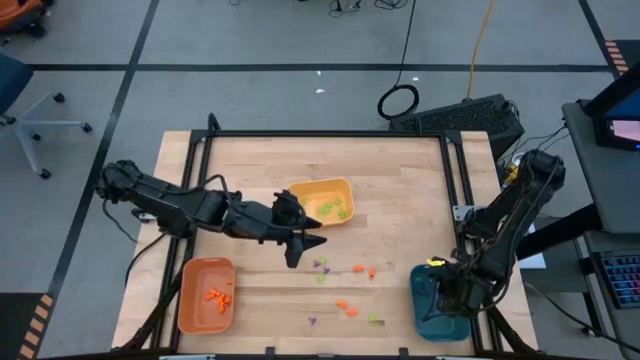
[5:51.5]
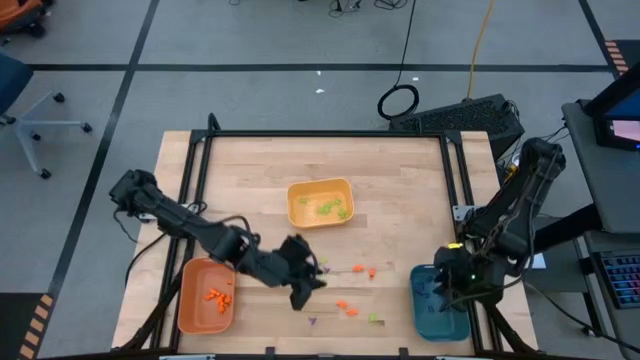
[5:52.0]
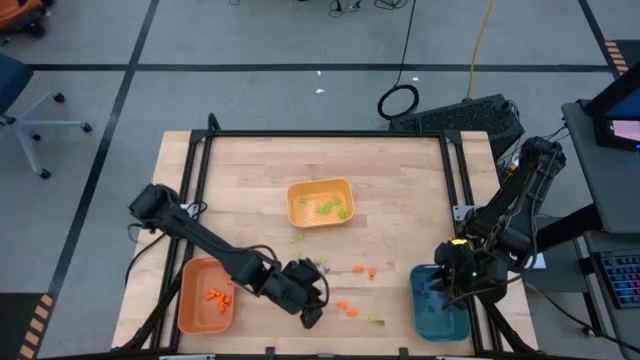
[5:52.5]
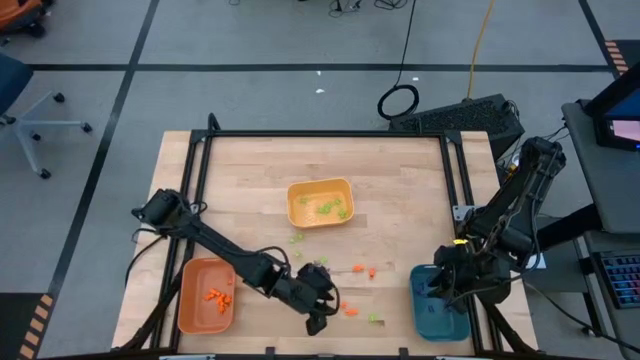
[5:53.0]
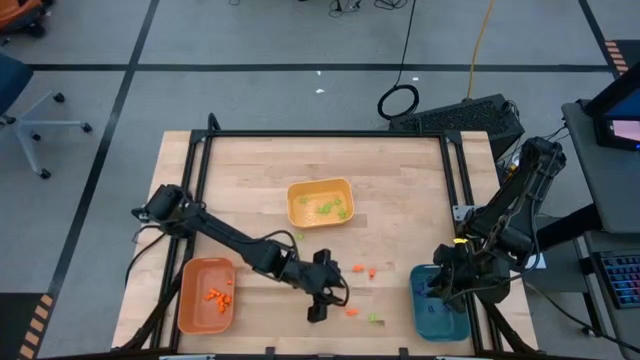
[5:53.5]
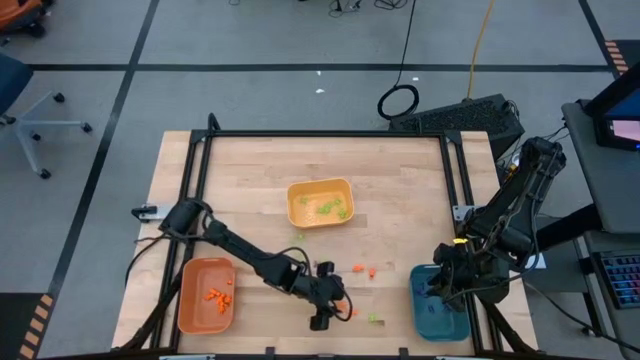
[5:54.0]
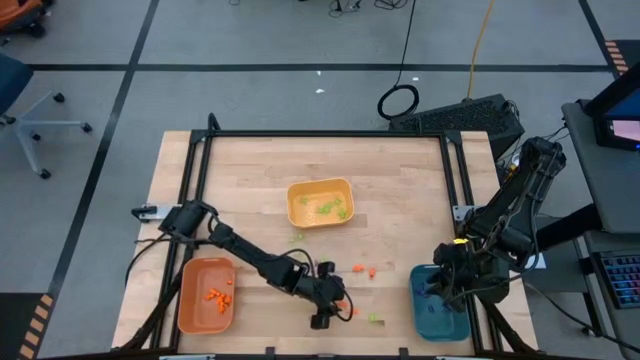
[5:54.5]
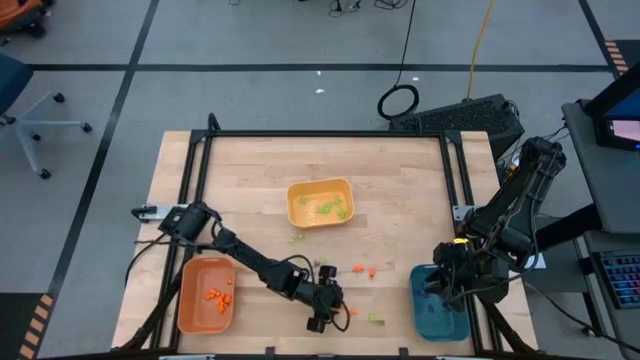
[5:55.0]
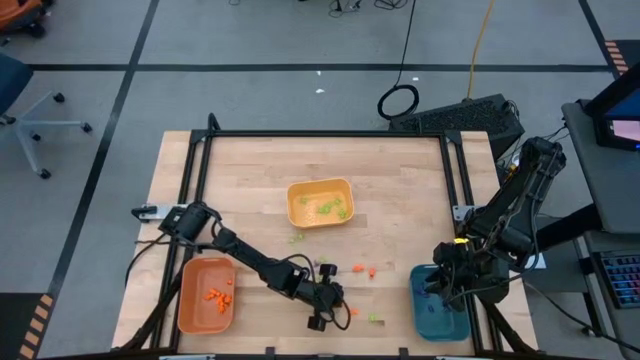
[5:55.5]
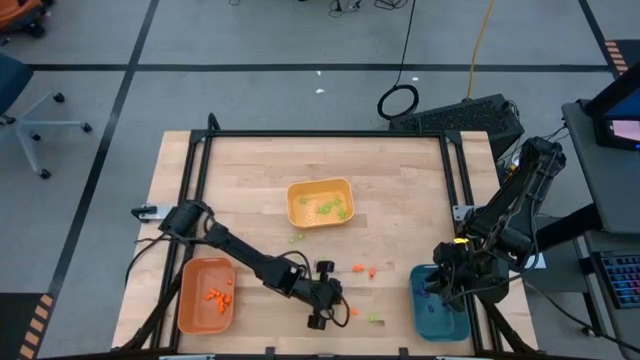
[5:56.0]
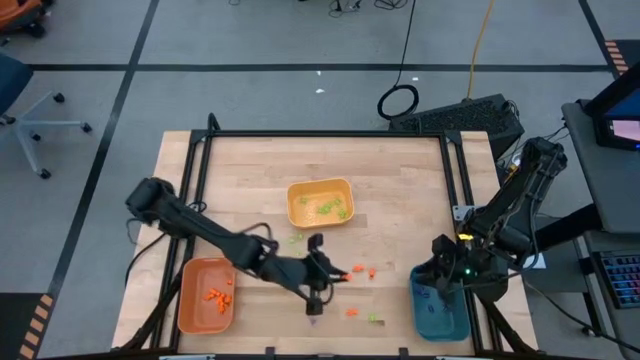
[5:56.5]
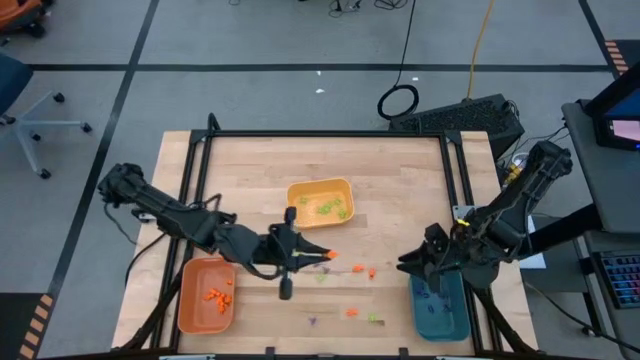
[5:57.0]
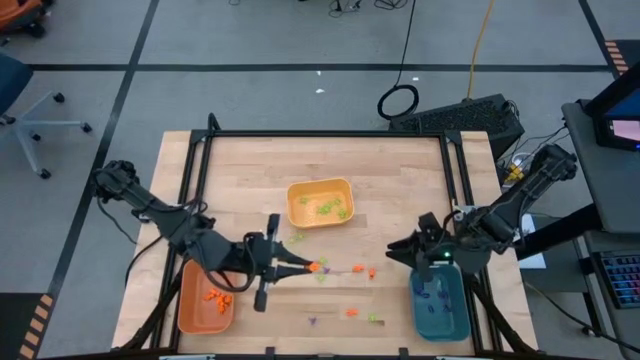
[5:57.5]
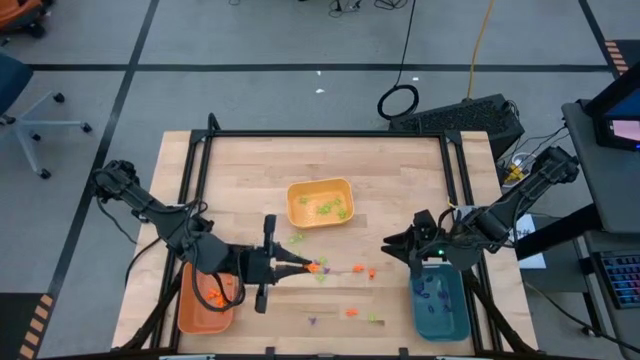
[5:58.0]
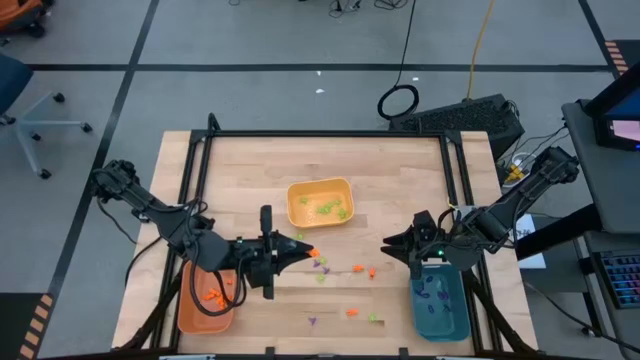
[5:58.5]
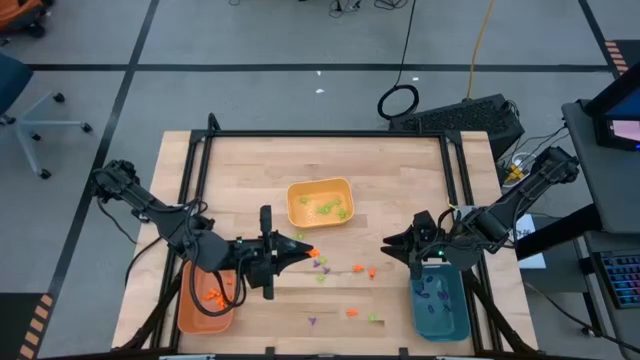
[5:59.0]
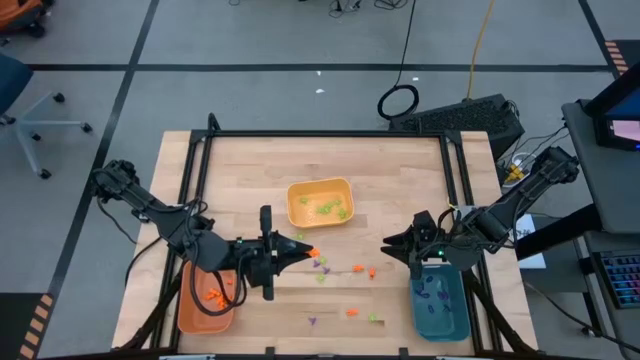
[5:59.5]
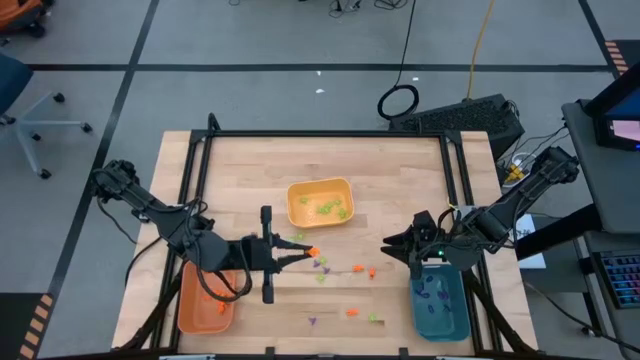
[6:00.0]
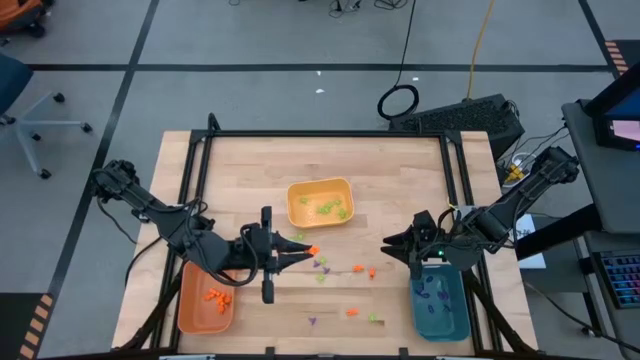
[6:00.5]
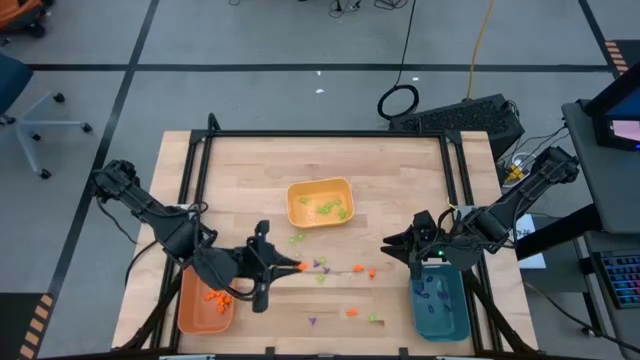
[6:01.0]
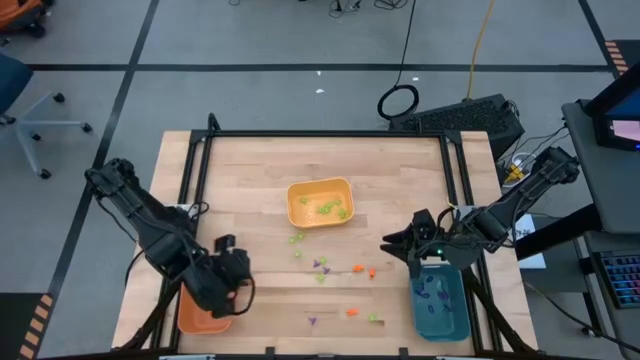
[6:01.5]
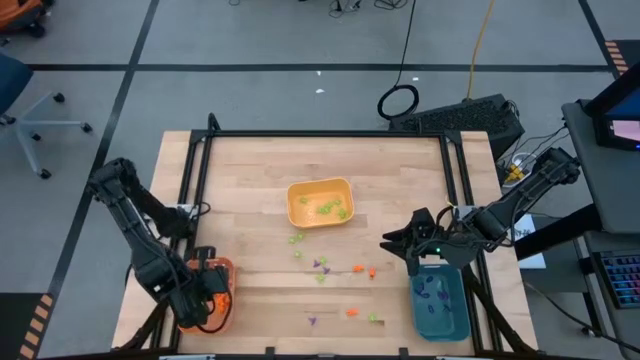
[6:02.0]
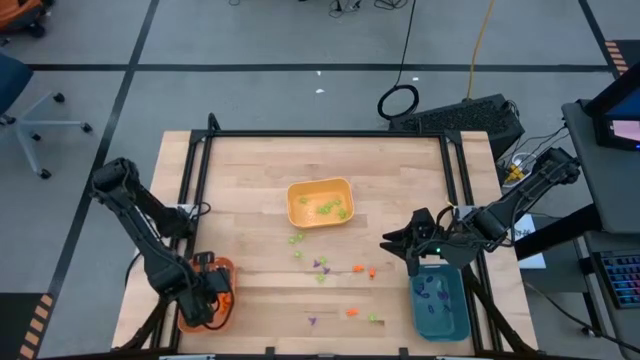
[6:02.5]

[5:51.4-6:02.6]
Task: Sort Halloween decoration
Put the orange skeleton toy into the orange bin

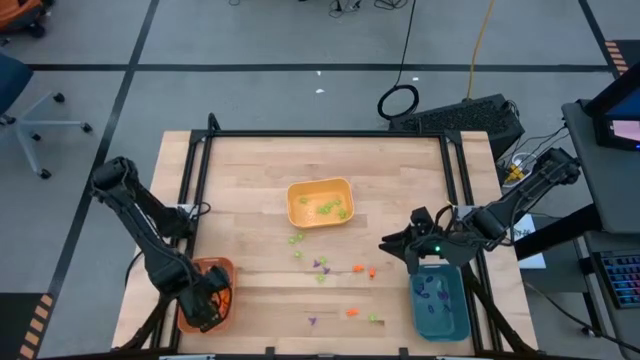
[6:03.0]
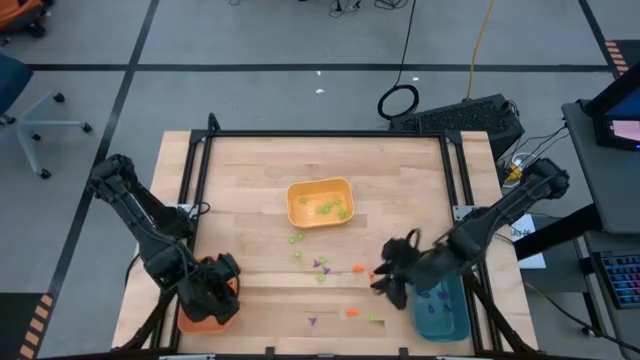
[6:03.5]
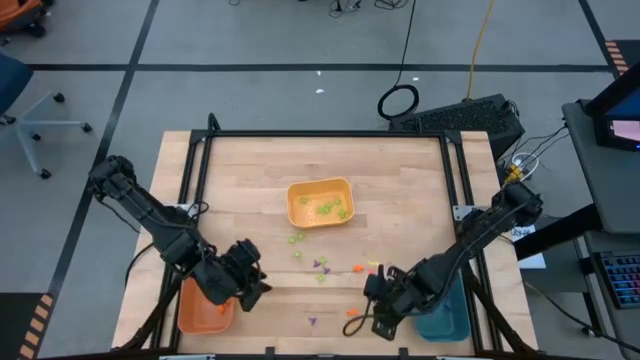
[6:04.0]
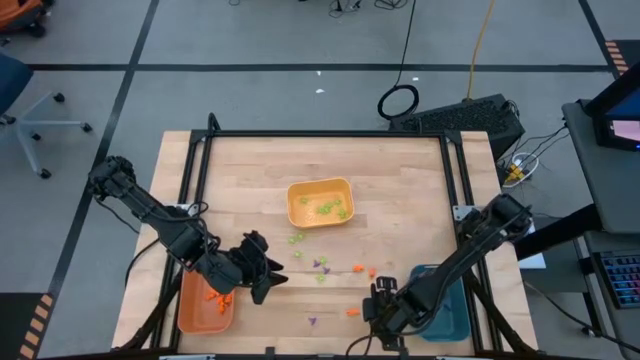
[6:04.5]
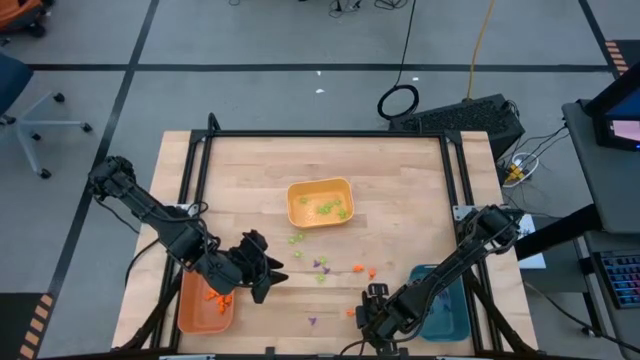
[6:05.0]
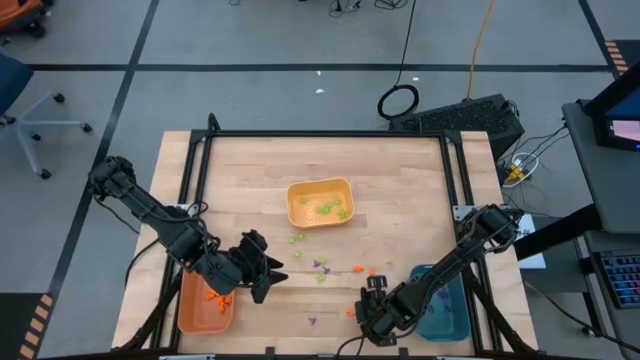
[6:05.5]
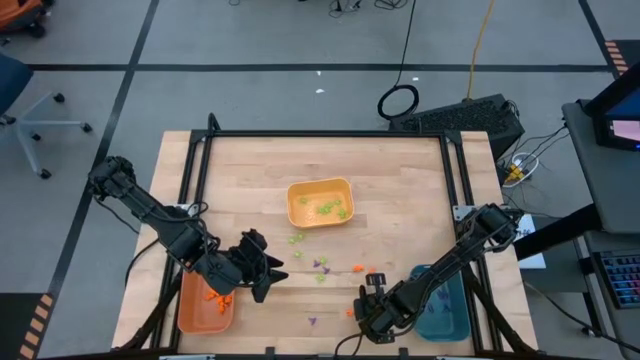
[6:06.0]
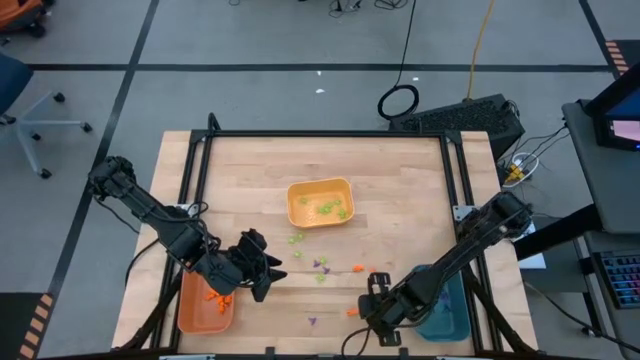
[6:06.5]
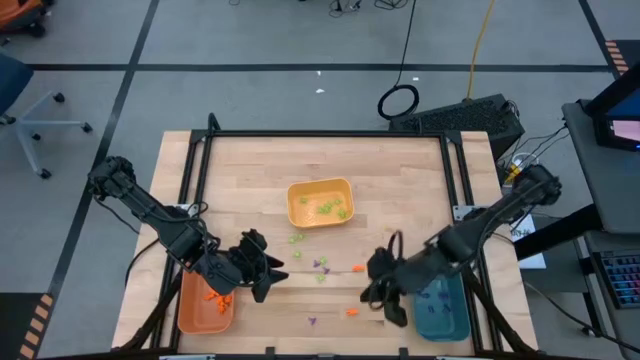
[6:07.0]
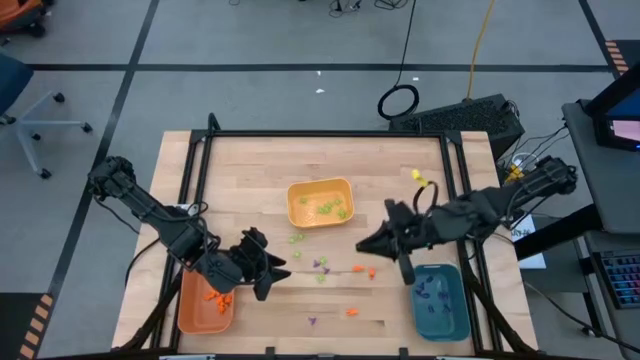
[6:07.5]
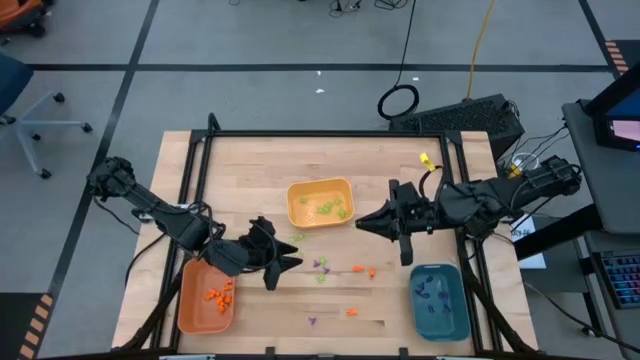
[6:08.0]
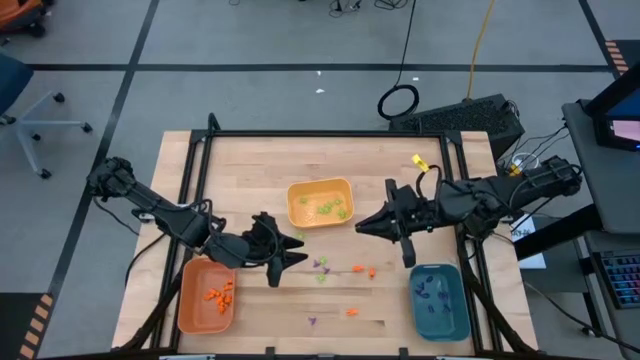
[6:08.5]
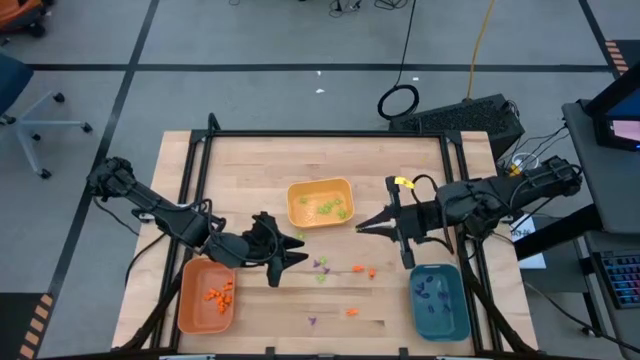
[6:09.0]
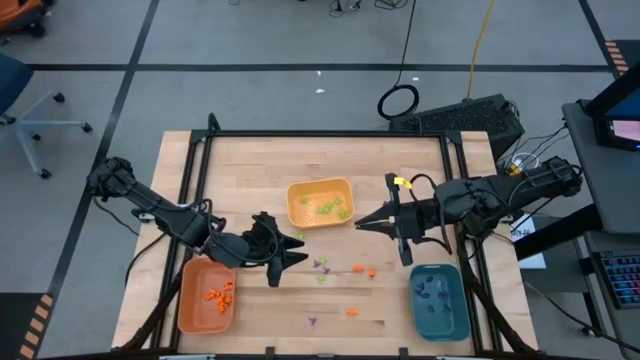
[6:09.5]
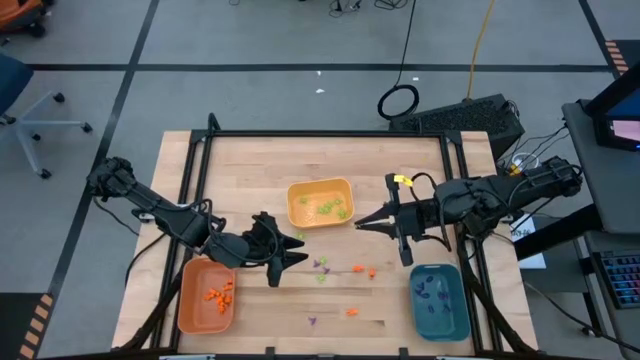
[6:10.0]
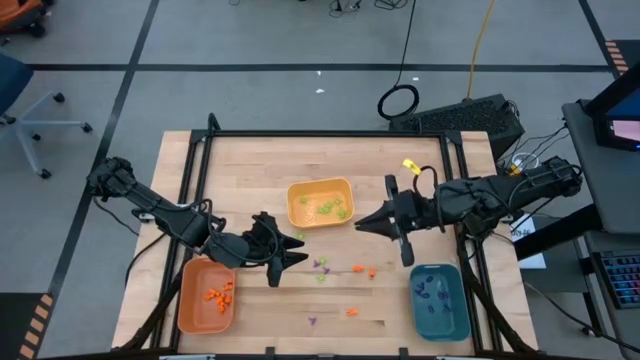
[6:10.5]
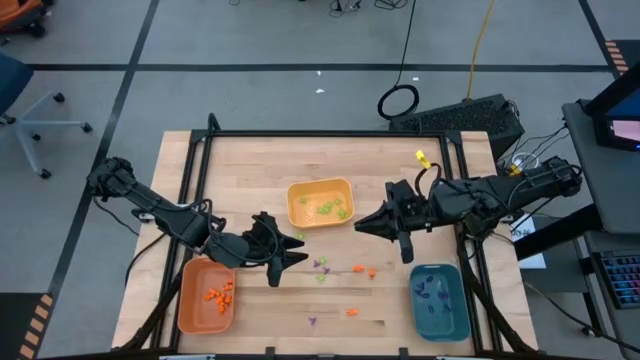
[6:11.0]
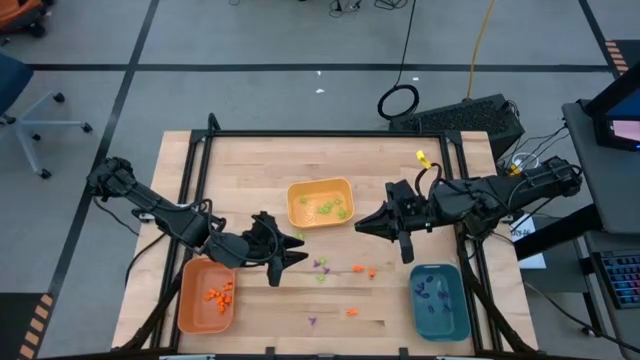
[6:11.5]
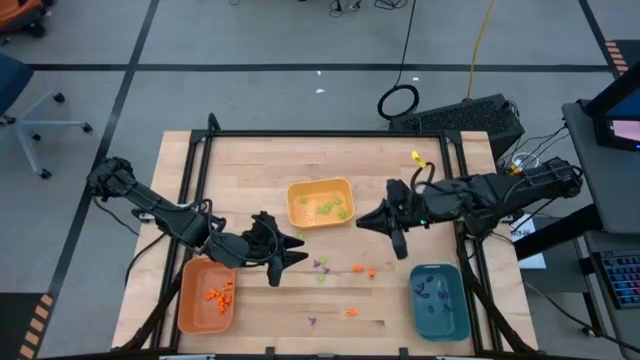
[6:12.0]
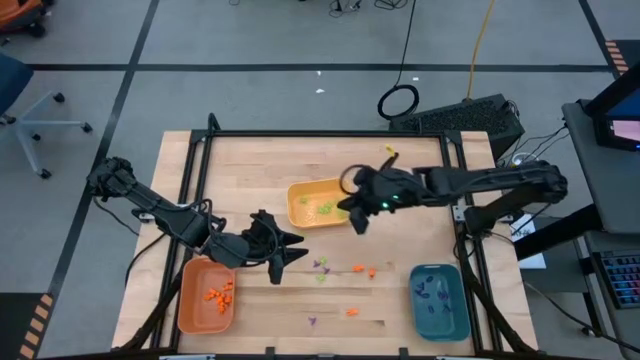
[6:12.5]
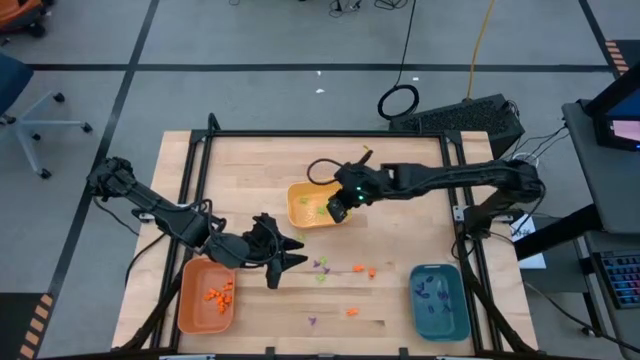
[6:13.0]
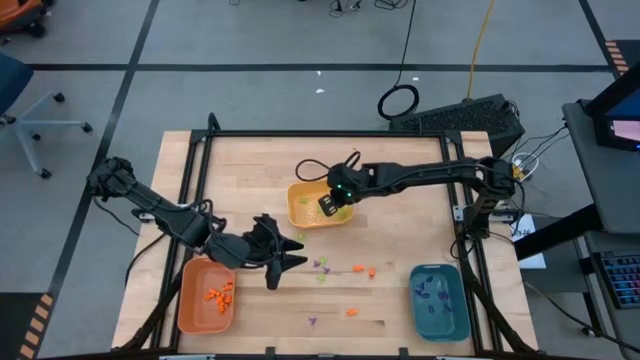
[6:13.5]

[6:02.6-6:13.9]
Put the green spider toy into the yellow bin
